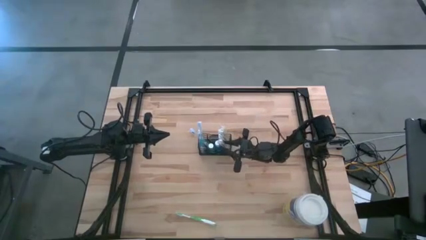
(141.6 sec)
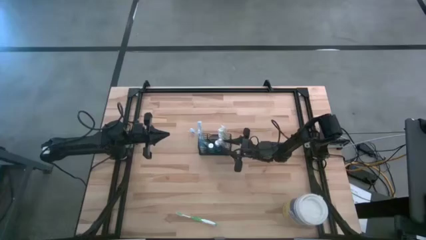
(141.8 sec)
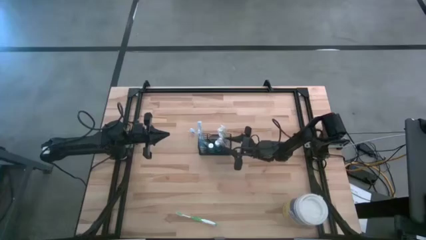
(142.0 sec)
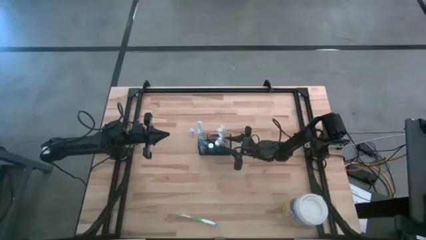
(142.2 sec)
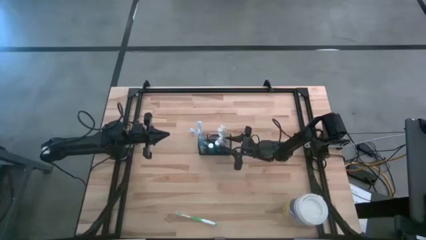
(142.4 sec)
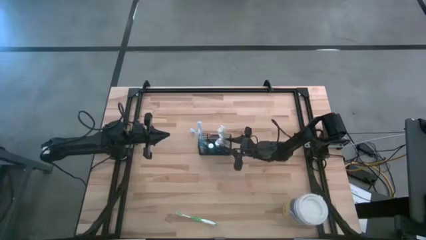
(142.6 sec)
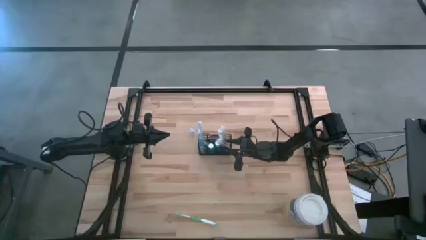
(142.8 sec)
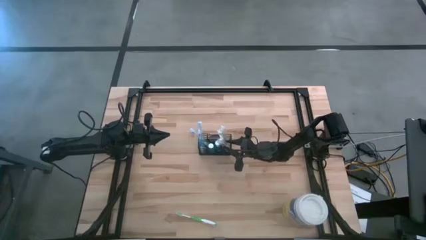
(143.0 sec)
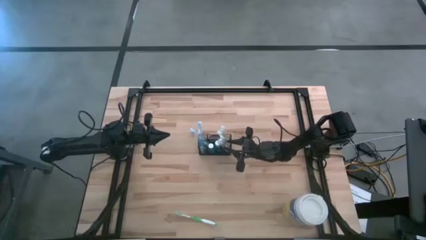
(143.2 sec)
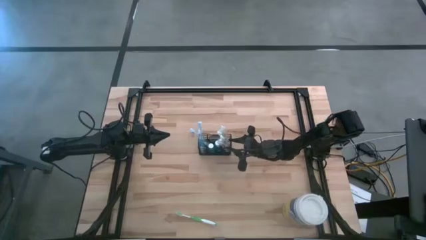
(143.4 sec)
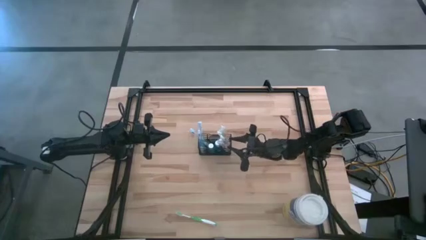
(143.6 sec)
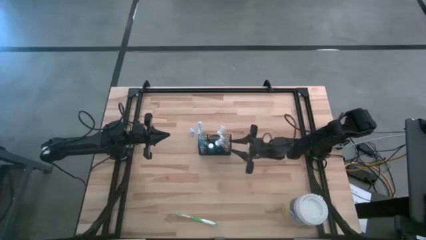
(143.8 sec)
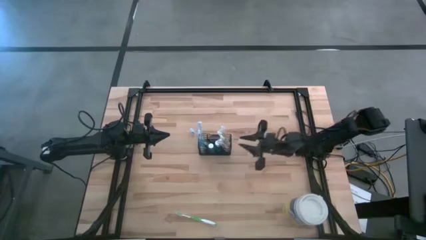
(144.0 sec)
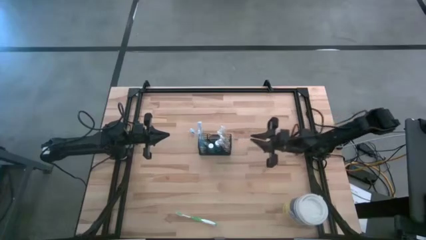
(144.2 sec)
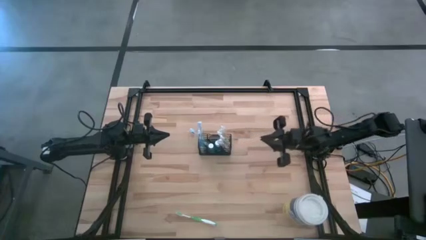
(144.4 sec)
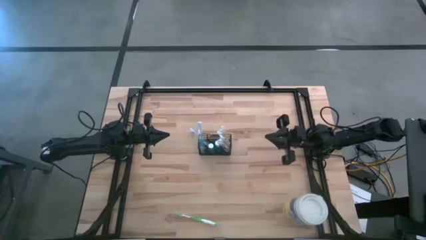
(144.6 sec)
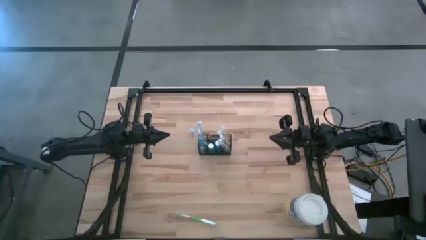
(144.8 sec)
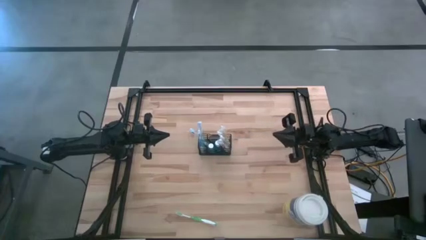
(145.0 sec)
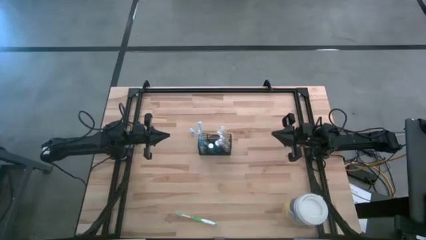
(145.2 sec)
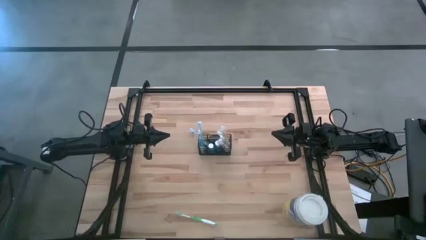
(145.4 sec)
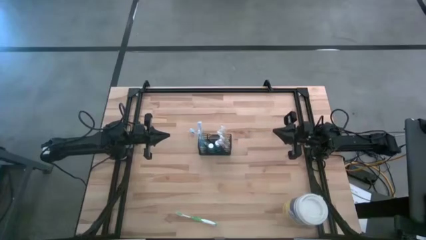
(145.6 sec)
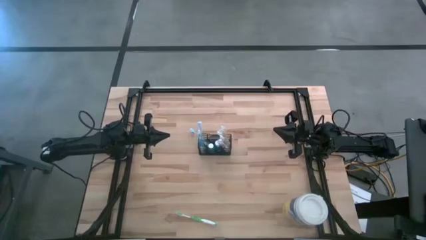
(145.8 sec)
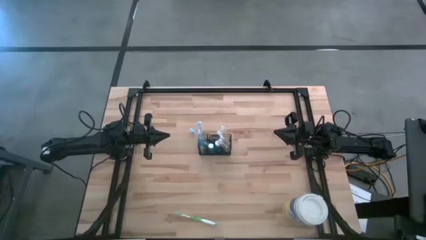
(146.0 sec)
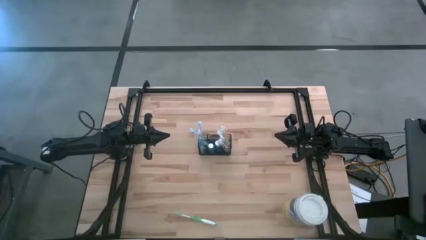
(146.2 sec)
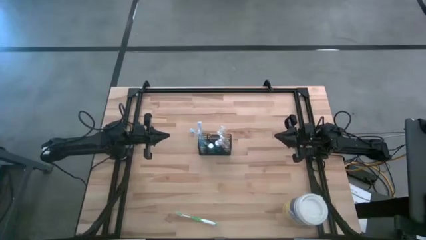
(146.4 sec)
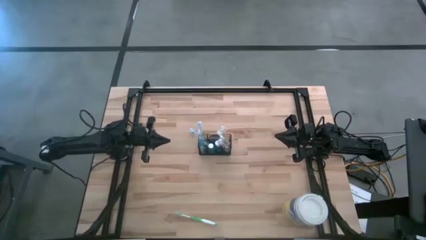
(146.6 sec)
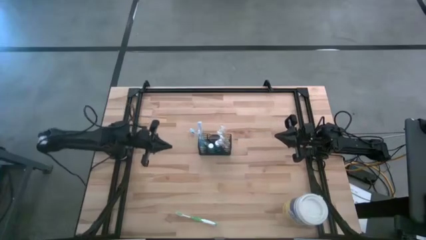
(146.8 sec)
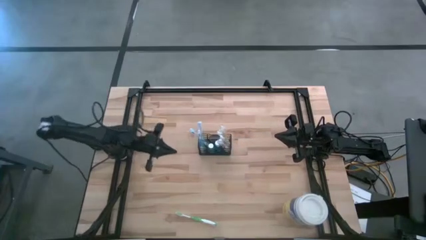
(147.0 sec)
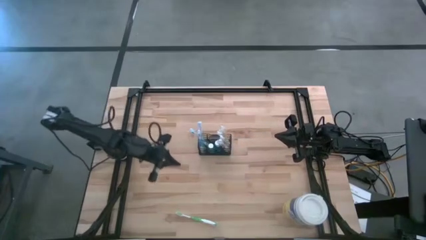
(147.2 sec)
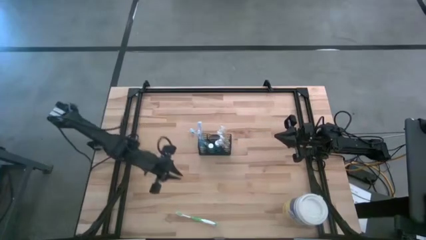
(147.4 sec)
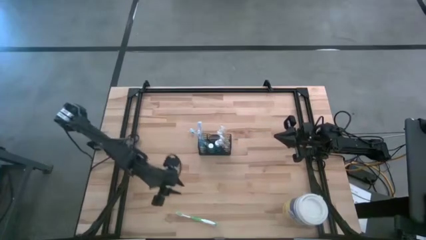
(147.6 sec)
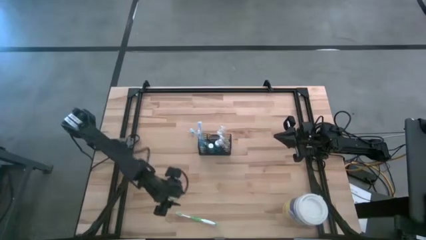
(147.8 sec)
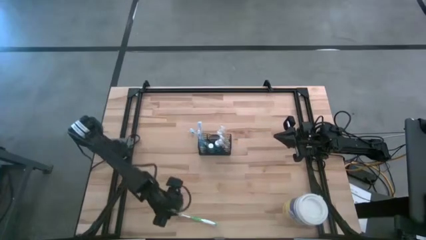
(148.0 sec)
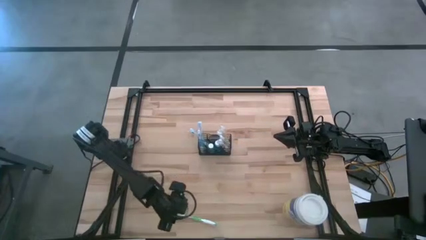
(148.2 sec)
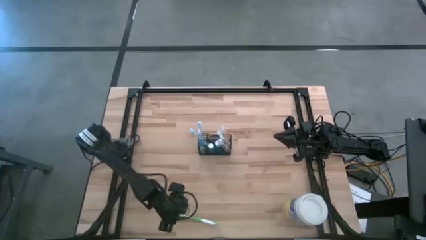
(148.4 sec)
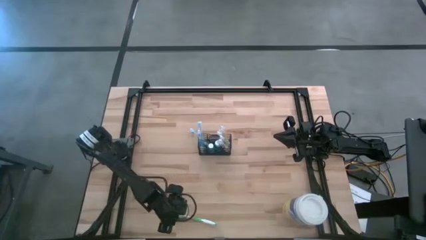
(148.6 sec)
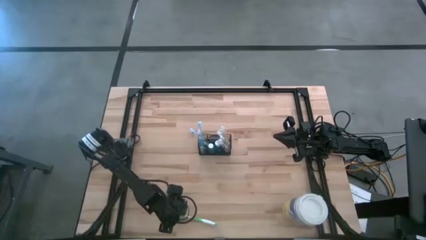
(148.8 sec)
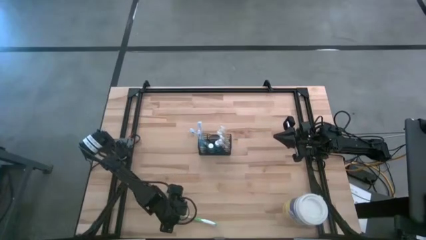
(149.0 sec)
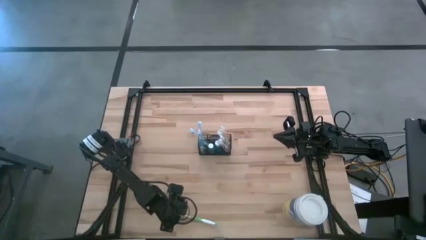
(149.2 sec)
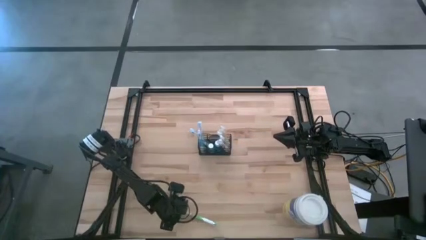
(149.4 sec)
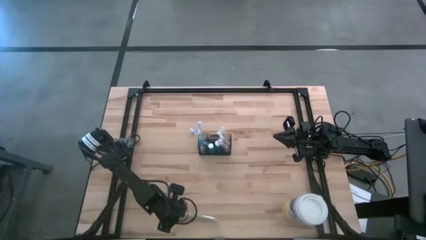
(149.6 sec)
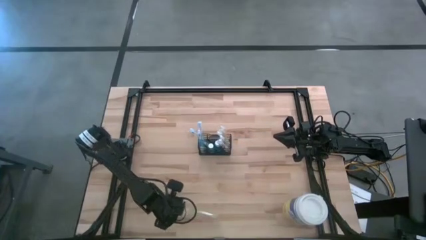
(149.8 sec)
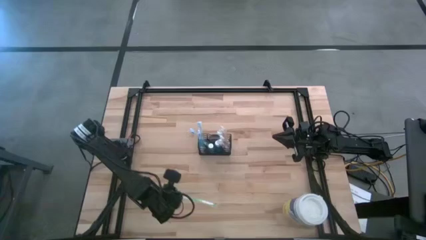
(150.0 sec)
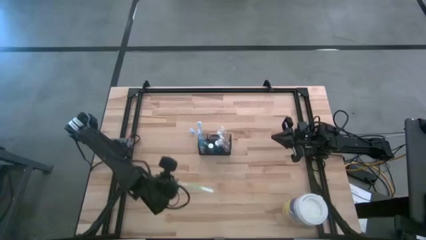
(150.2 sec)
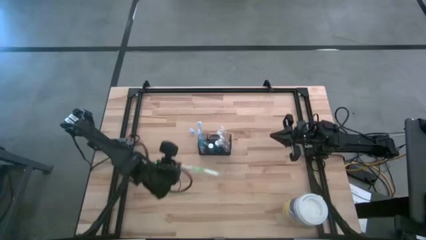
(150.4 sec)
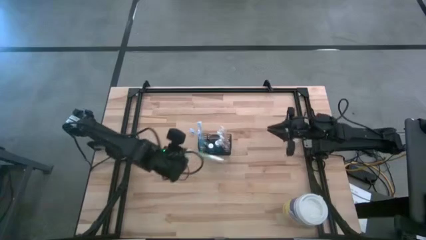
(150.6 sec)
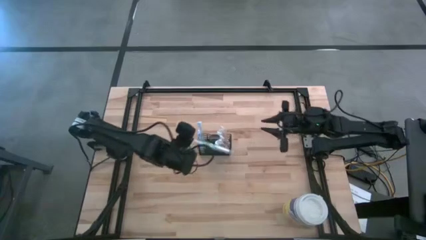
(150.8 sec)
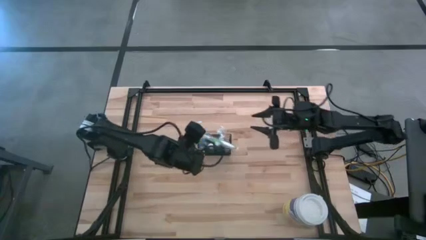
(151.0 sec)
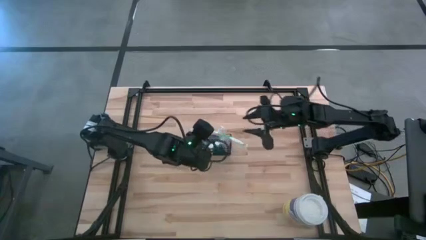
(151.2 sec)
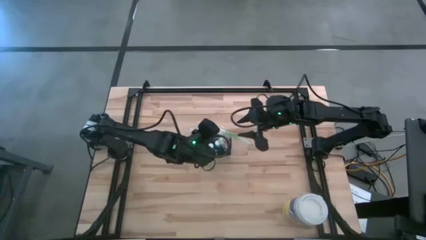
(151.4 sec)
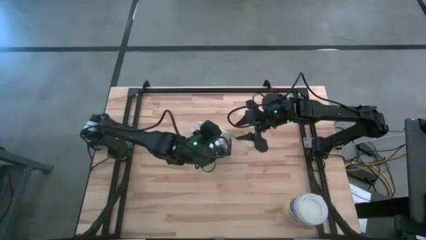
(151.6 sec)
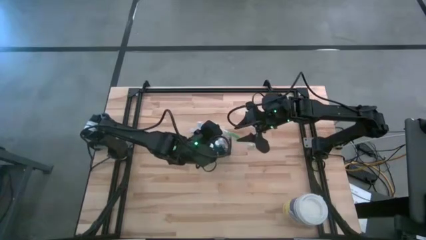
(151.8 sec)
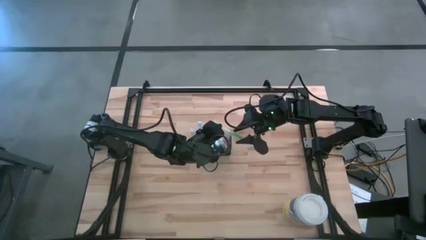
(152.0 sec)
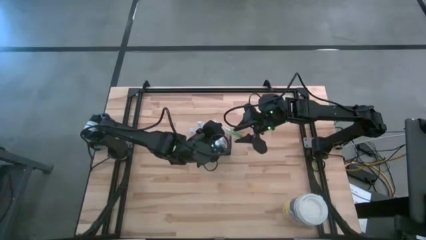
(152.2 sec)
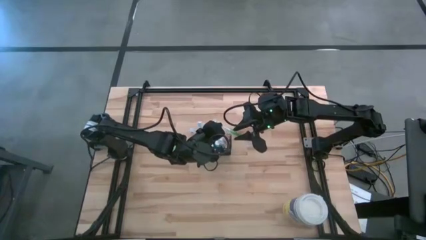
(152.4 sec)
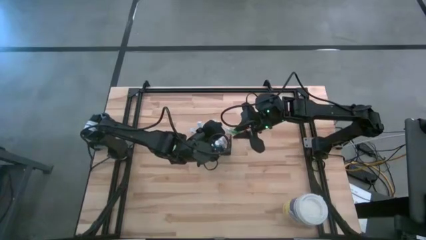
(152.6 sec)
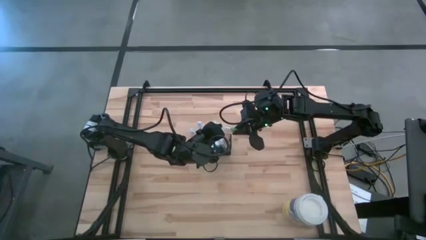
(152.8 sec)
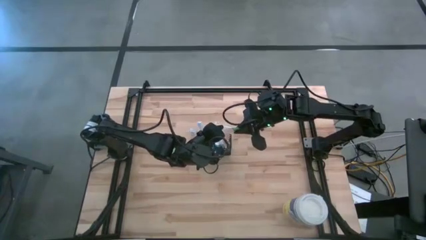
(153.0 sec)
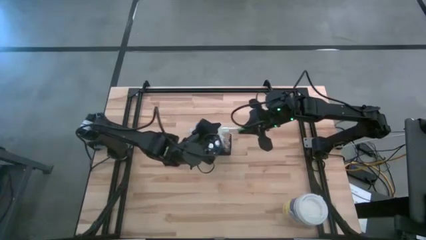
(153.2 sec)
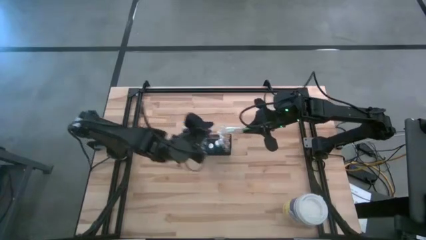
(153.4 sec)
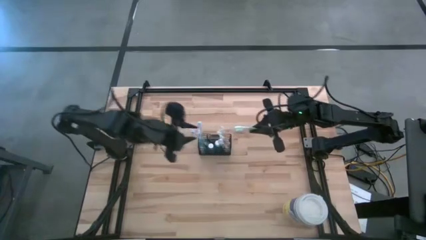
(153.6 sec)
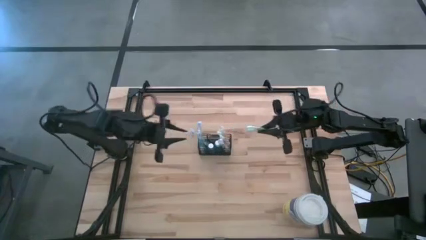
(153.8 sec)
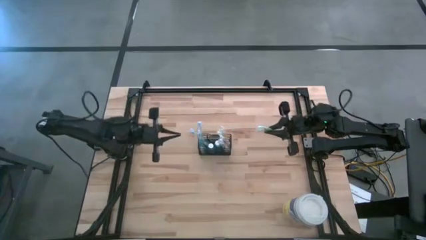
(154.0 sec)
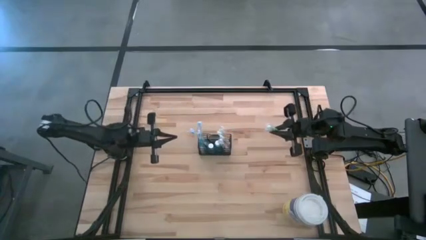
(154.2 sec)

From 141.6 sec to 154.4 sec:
Task: Pick & Place toothbrushing station
Put the green toothbrush into the black mesh organizer
